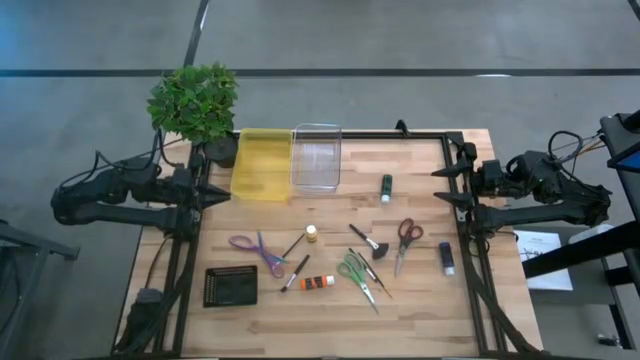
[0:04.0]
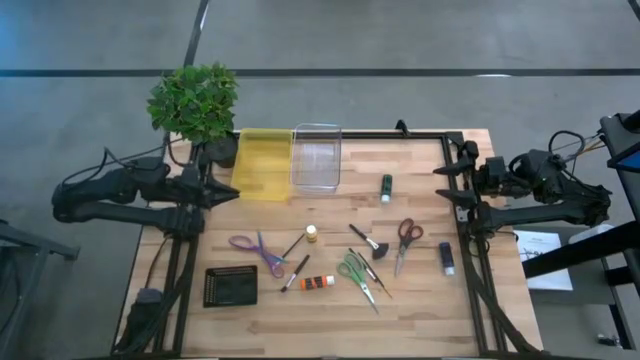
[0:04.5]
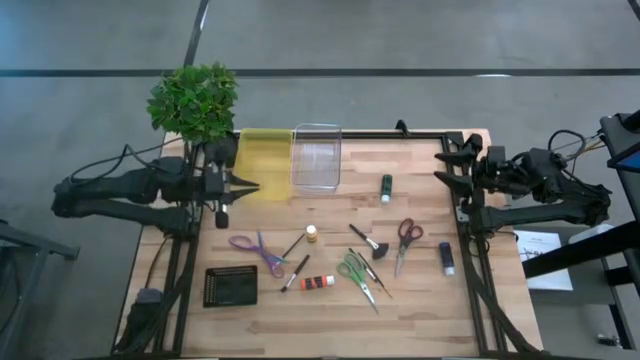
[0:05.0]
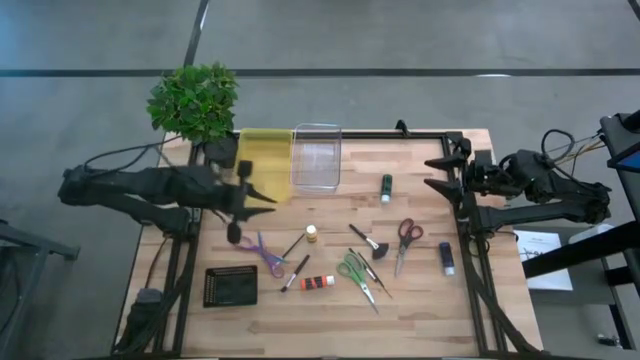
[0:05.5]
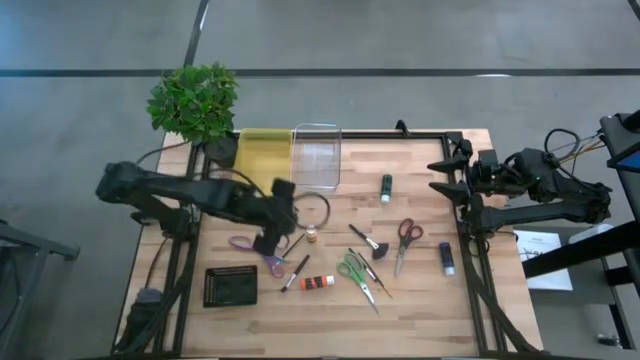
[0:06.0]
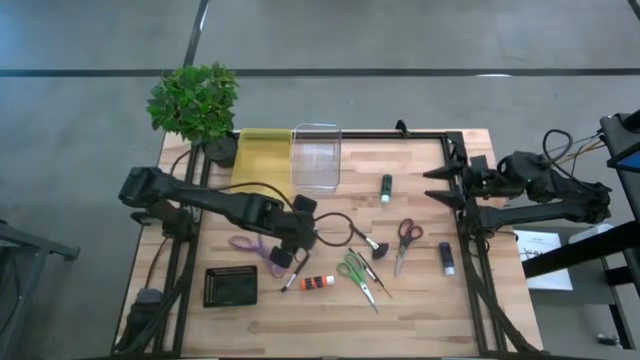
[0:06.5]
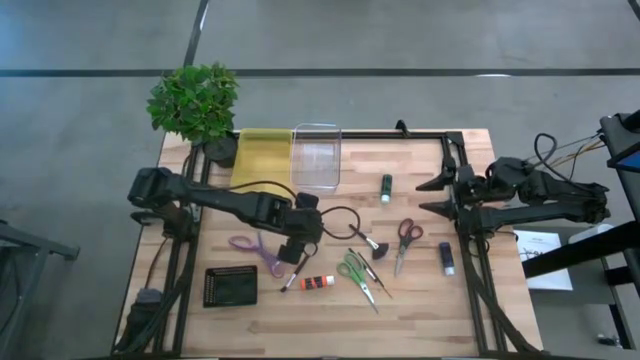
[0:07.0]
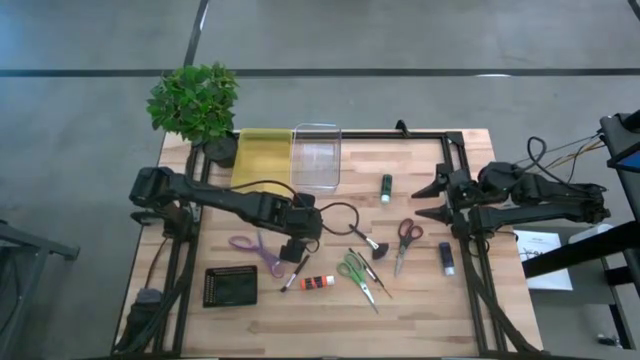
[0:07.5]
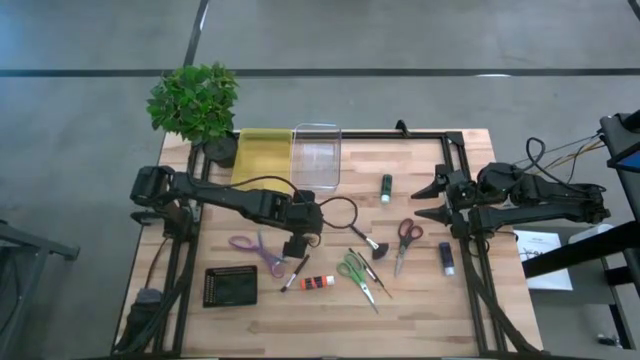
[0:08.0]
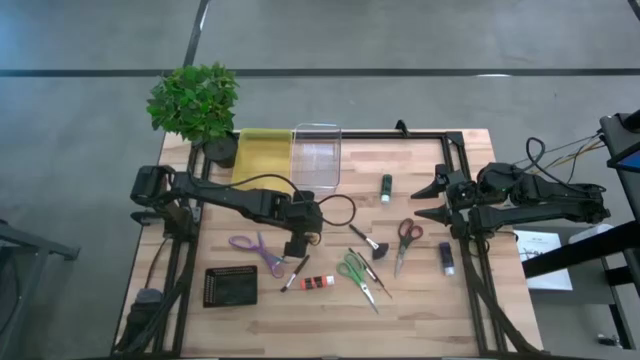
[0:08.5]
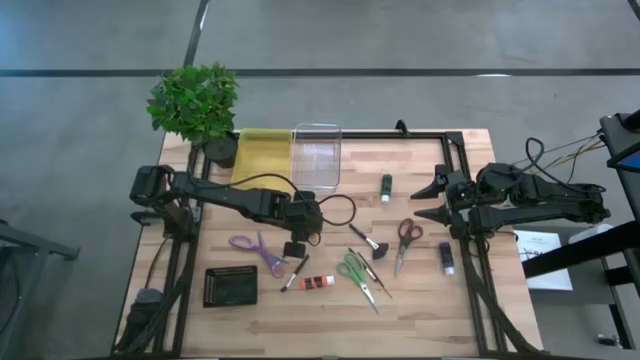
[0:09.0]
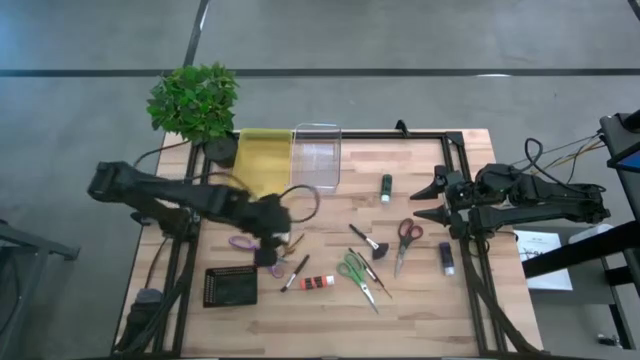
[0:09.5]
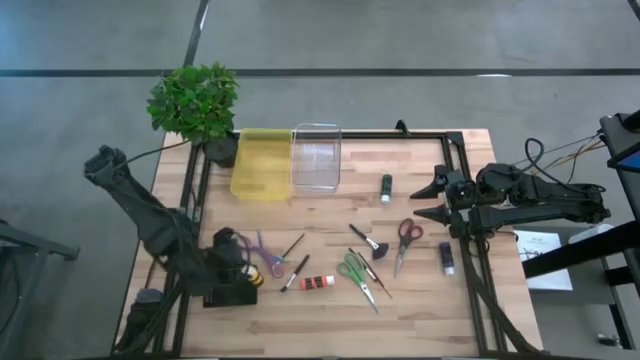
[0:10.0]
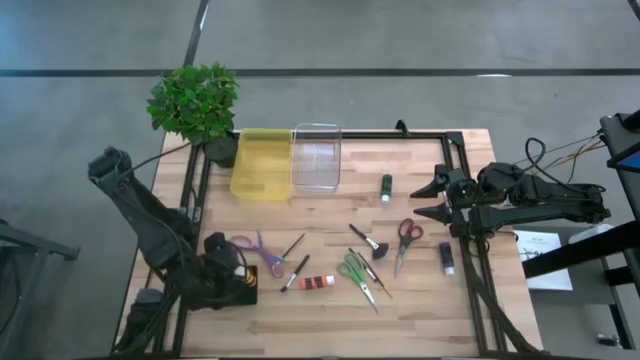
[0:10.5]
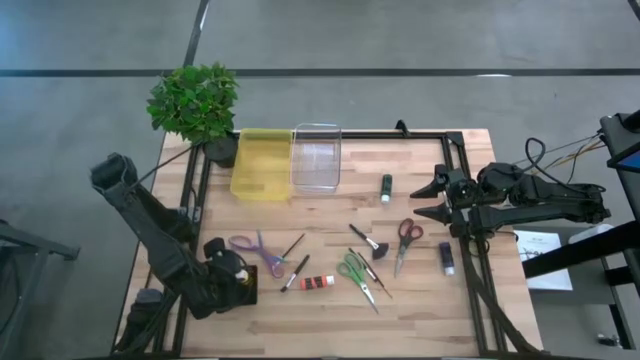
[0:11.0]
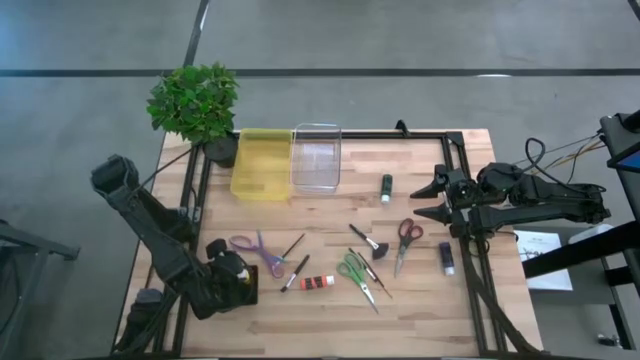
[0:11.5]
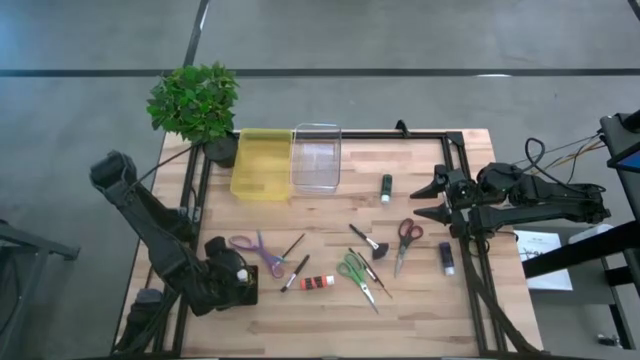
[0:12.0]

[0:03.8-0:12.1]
Task: Pick & Place Paint Supplies
Put the yellow paint bottle into the black bin

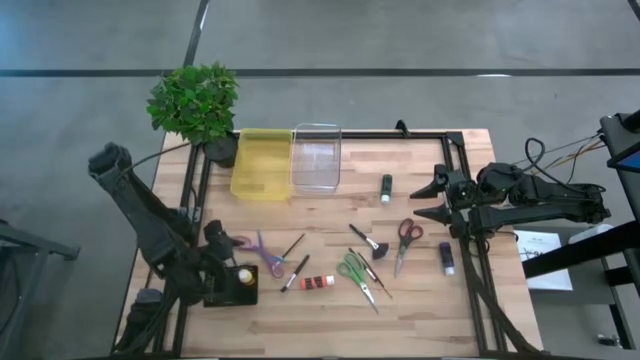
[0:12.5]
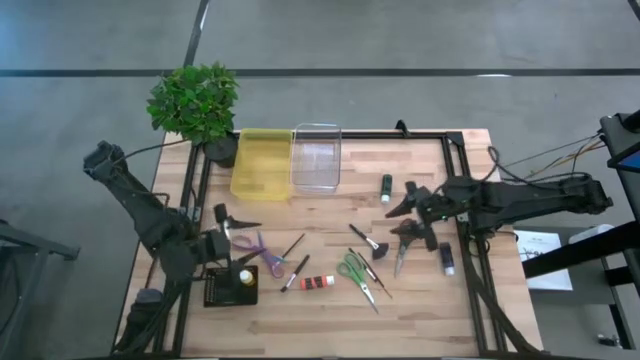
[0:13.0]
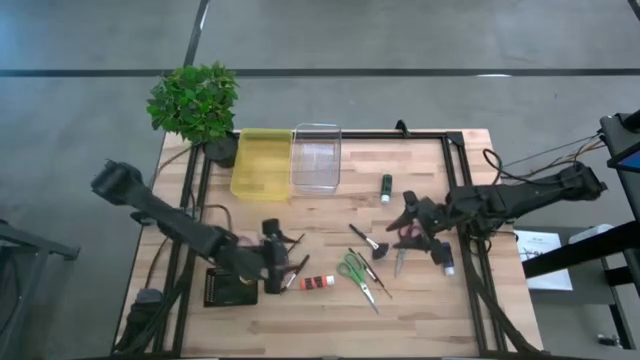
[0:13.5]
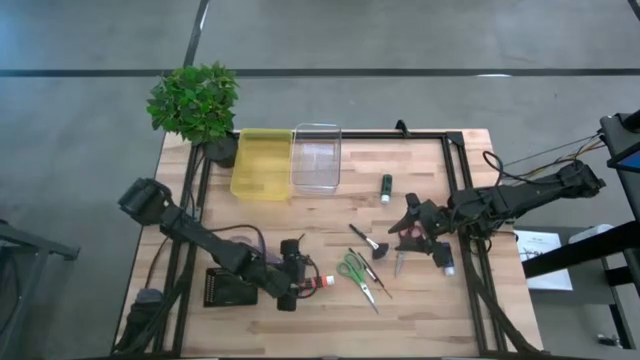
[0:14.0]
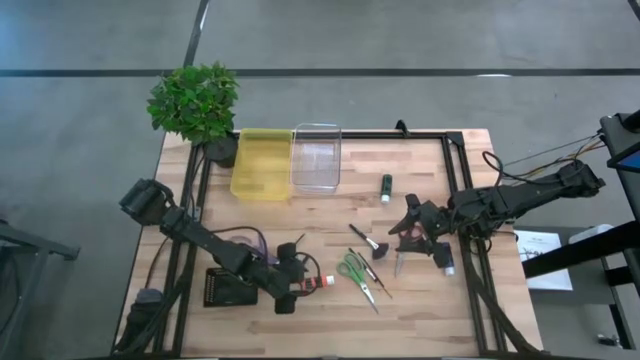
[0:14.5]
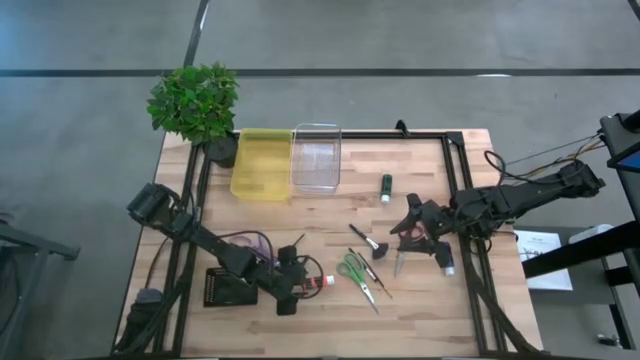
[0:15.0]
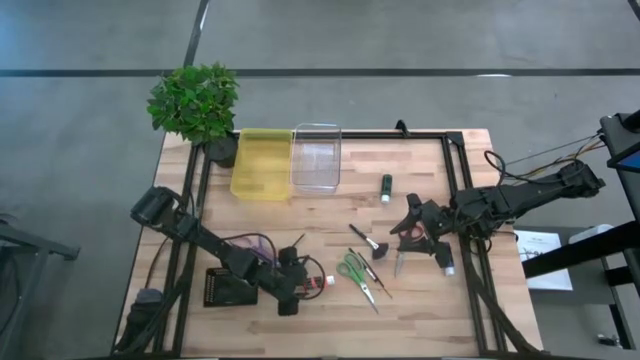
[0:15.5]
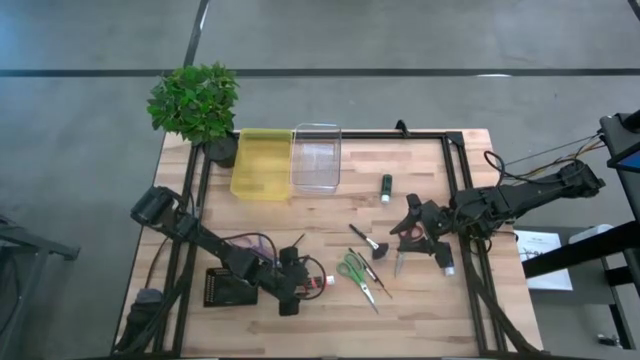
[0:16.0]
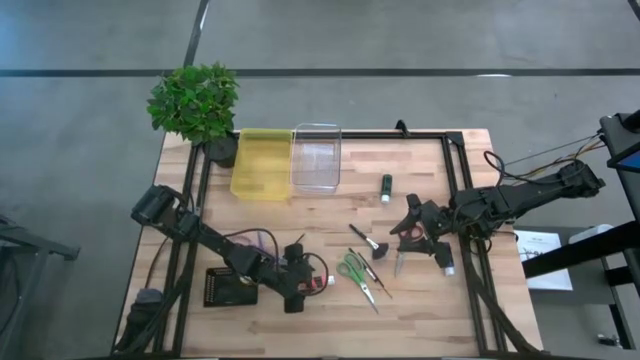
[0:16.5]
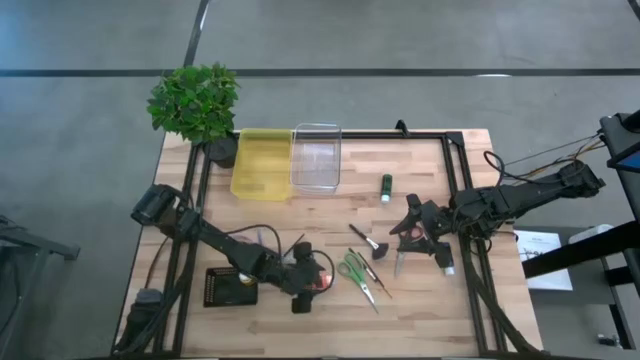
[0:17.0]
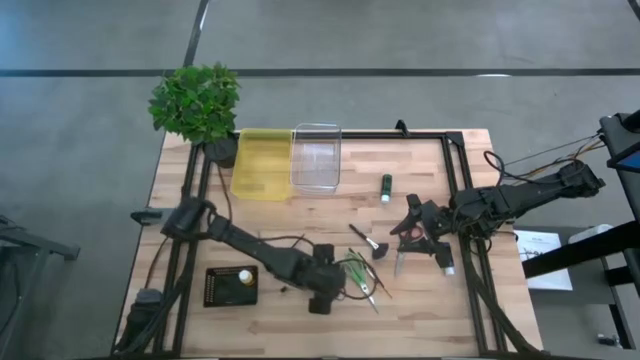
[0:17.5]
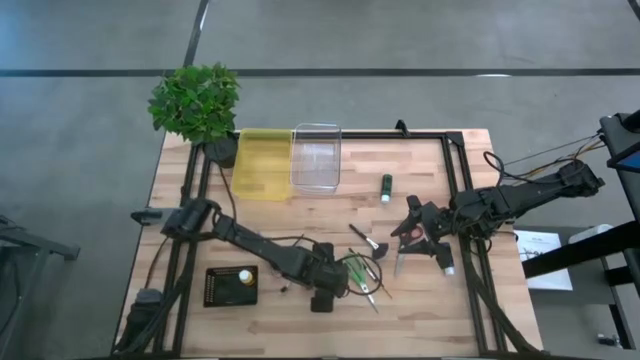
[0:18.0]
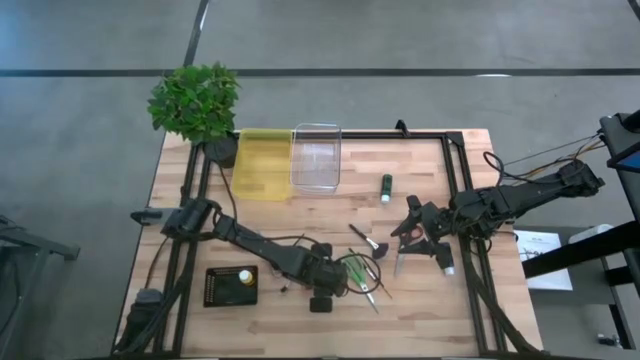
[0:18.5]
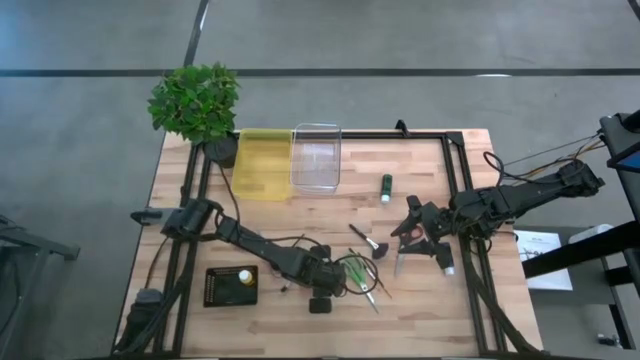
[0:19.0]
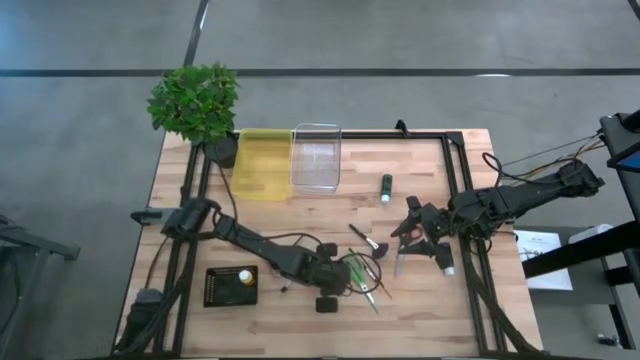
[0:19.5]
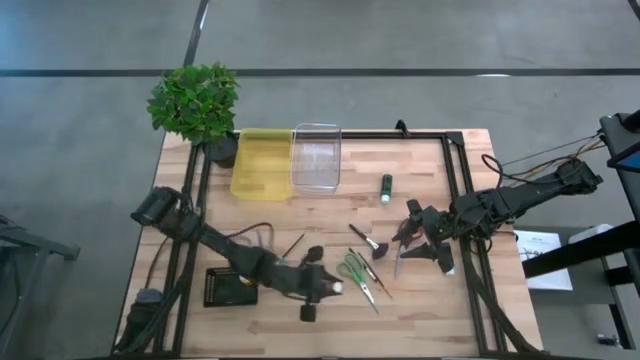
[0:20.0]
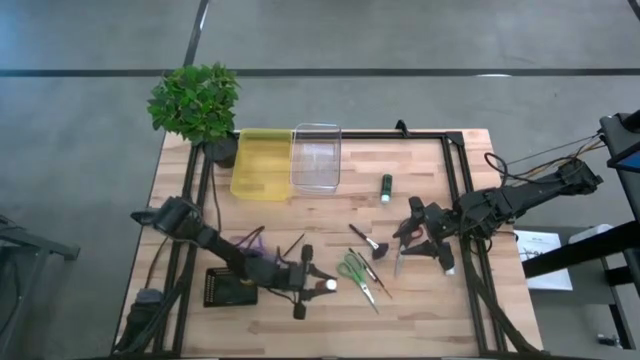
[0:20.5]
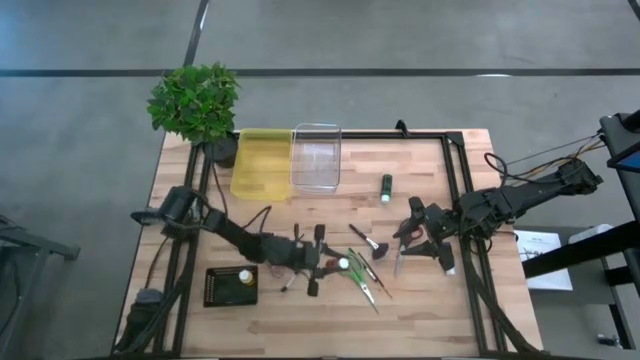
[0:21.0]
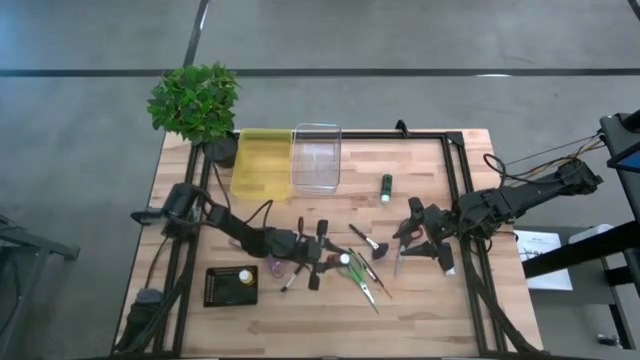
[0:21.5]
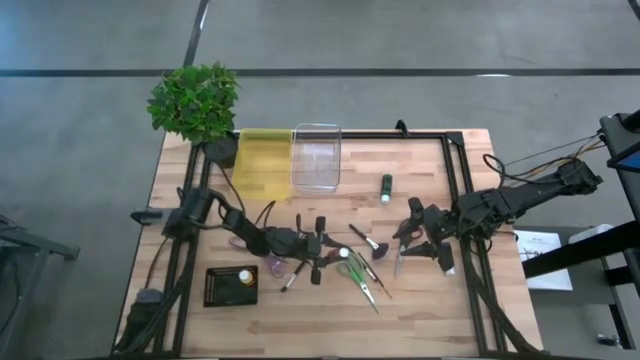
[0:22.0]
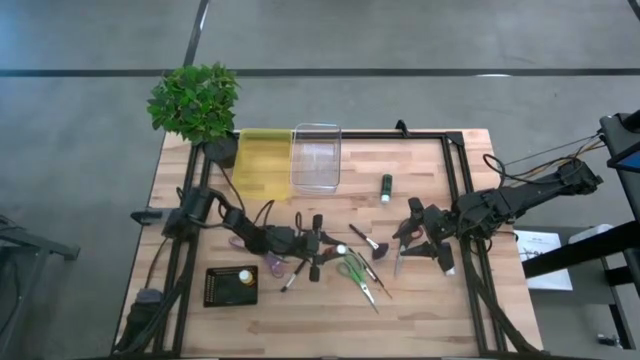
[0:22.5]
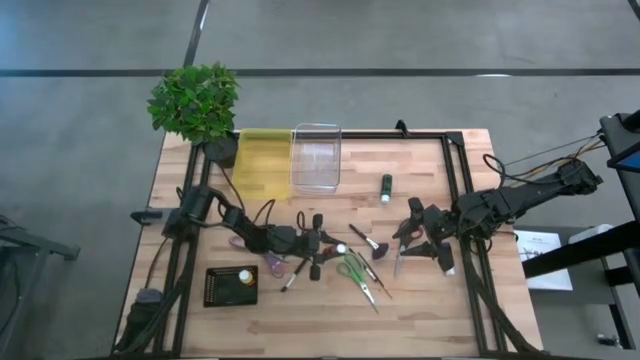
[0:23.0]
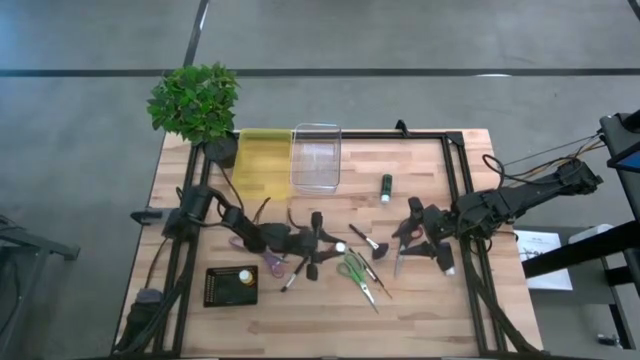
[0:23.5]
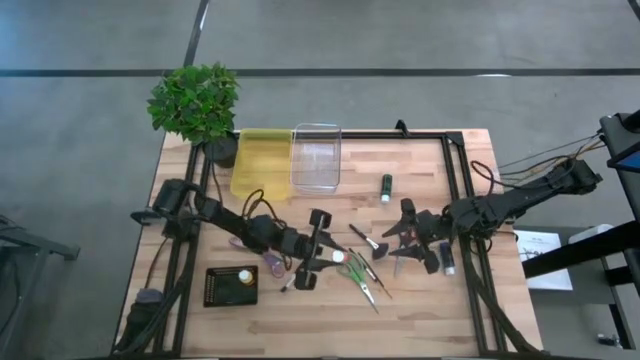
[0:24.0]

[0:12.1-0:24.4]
Put the orange paint bottle into the black bin
